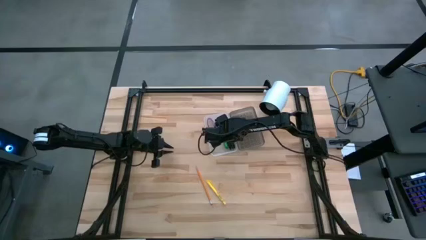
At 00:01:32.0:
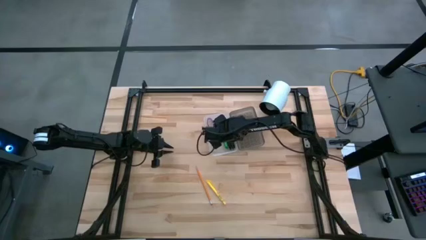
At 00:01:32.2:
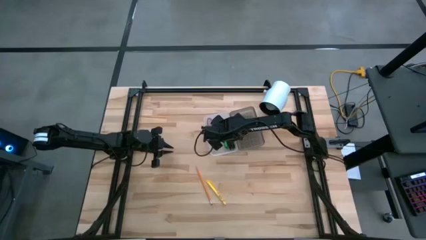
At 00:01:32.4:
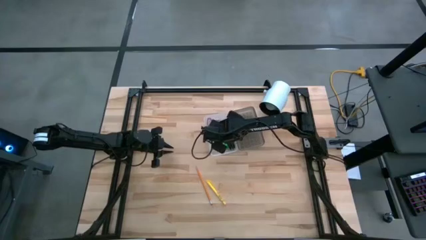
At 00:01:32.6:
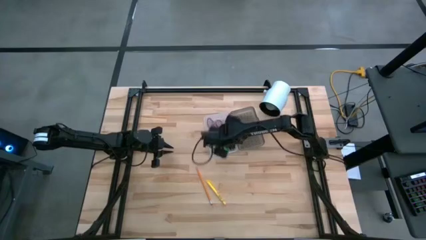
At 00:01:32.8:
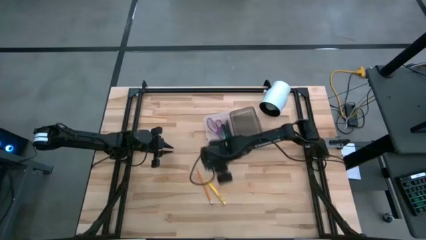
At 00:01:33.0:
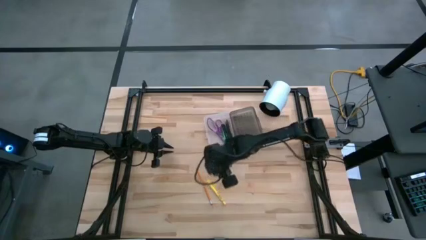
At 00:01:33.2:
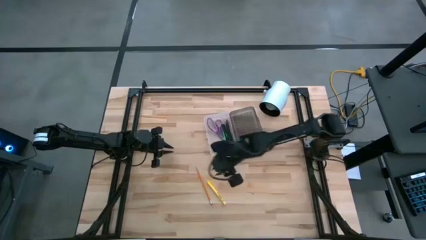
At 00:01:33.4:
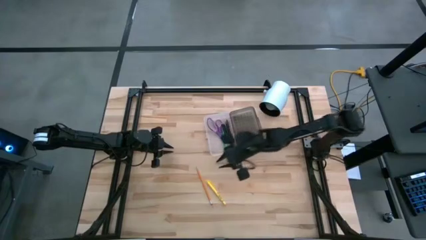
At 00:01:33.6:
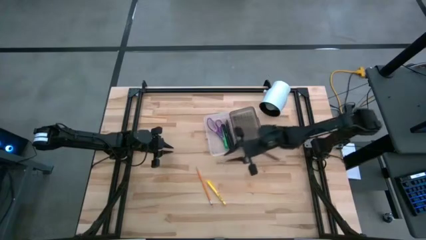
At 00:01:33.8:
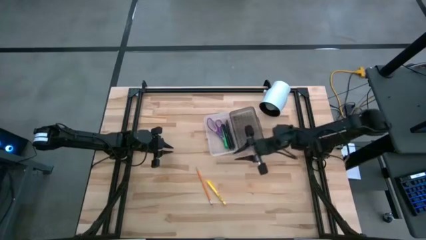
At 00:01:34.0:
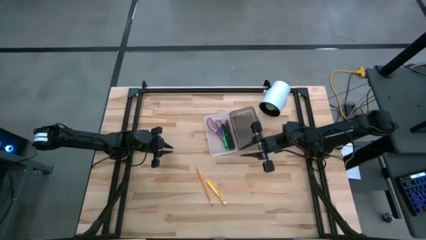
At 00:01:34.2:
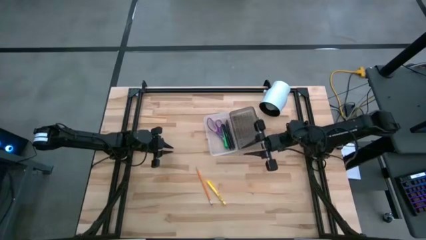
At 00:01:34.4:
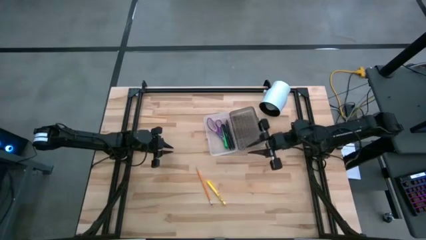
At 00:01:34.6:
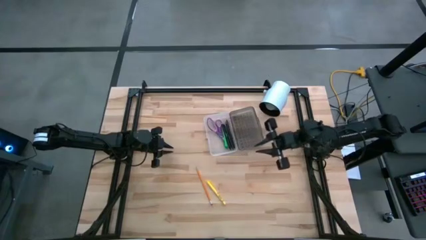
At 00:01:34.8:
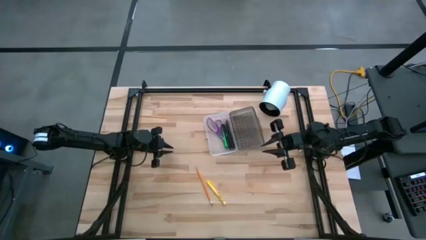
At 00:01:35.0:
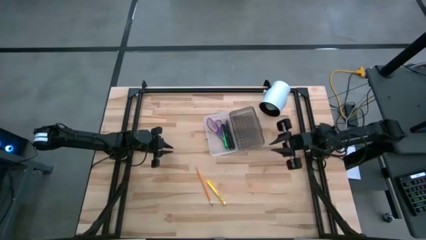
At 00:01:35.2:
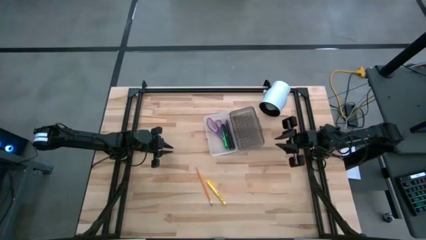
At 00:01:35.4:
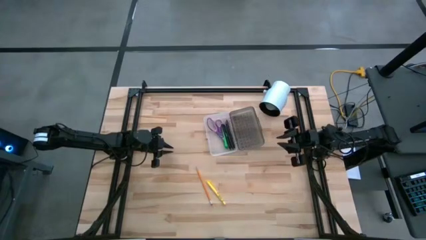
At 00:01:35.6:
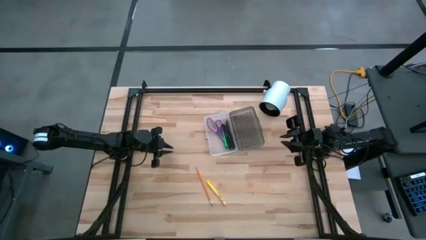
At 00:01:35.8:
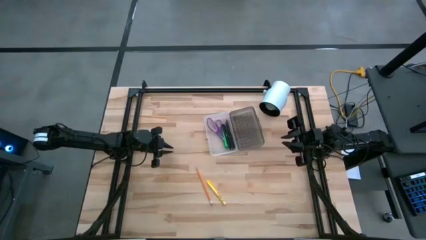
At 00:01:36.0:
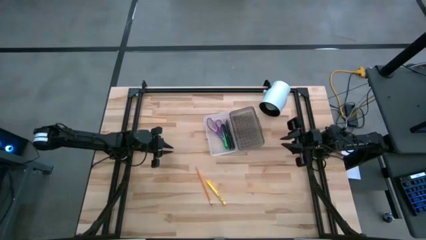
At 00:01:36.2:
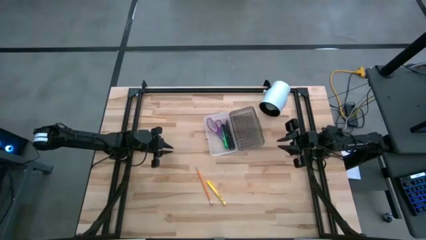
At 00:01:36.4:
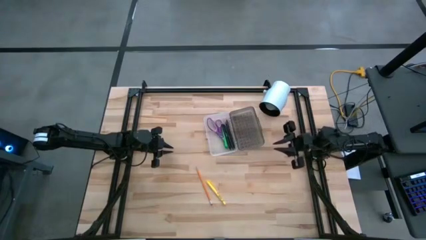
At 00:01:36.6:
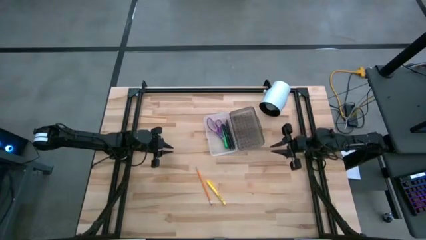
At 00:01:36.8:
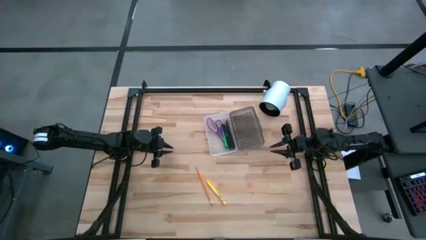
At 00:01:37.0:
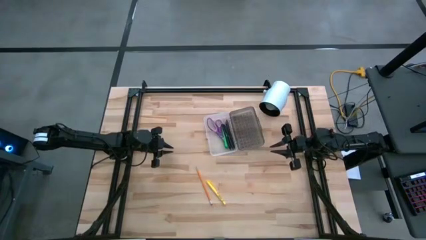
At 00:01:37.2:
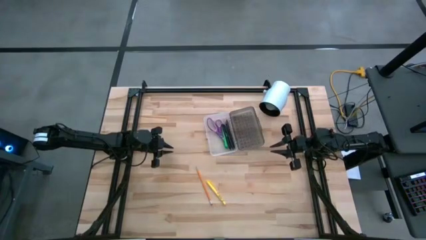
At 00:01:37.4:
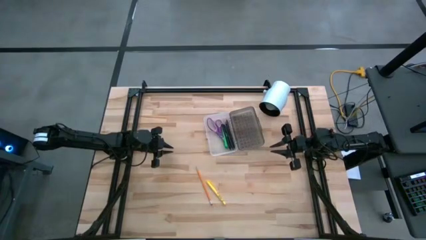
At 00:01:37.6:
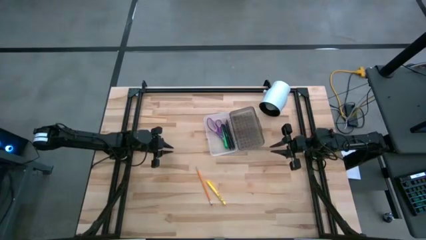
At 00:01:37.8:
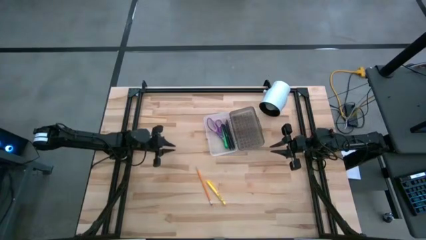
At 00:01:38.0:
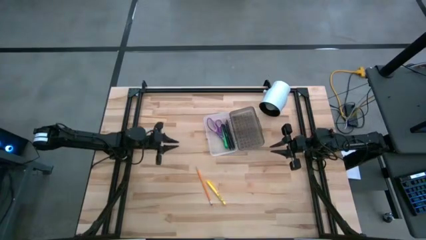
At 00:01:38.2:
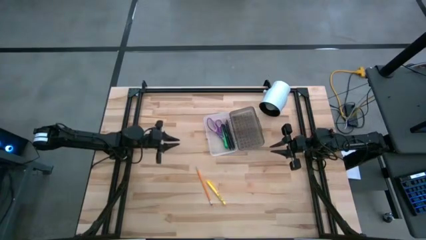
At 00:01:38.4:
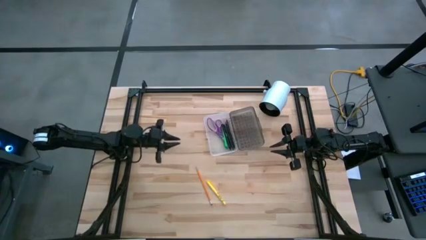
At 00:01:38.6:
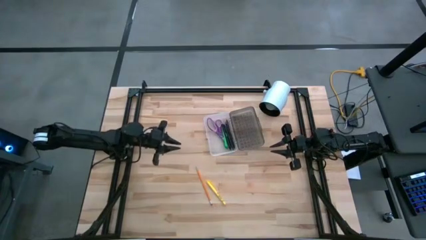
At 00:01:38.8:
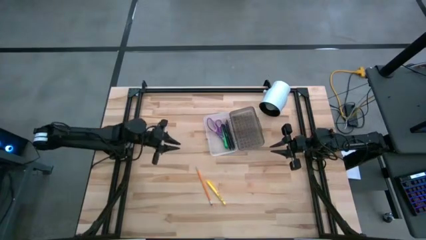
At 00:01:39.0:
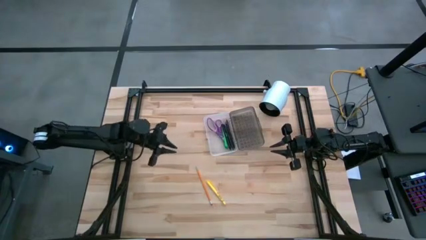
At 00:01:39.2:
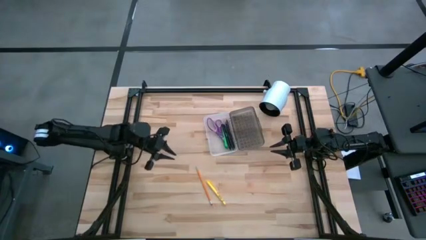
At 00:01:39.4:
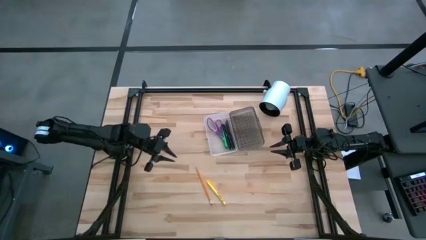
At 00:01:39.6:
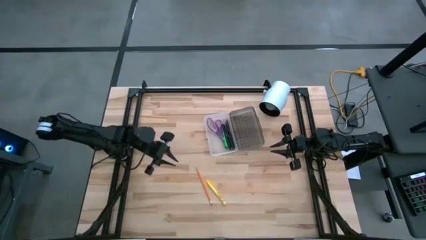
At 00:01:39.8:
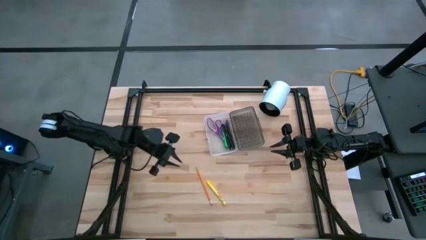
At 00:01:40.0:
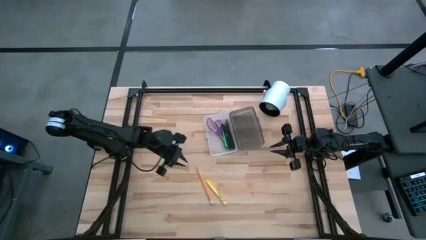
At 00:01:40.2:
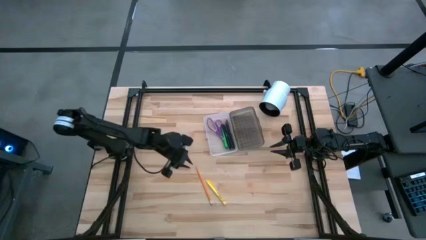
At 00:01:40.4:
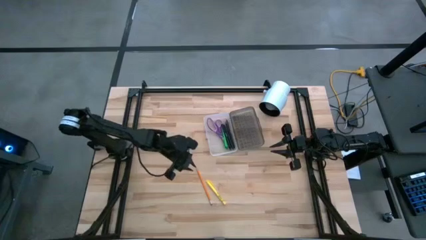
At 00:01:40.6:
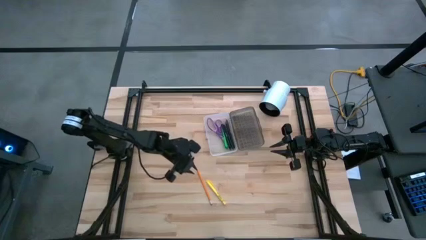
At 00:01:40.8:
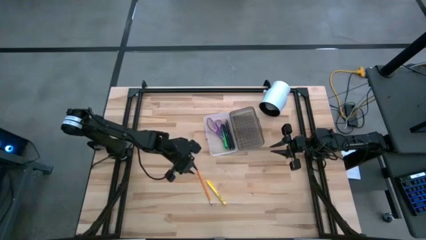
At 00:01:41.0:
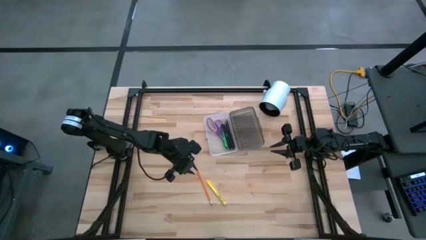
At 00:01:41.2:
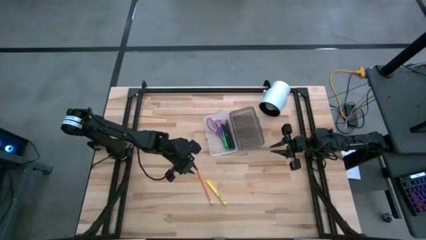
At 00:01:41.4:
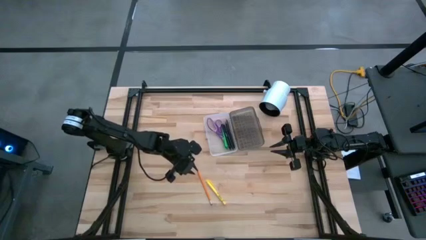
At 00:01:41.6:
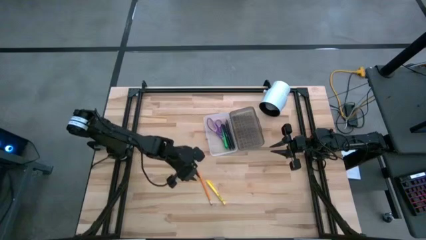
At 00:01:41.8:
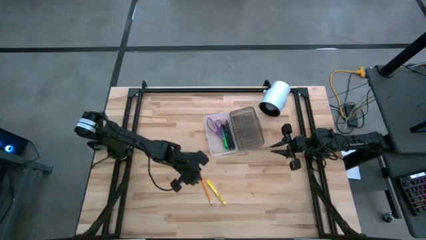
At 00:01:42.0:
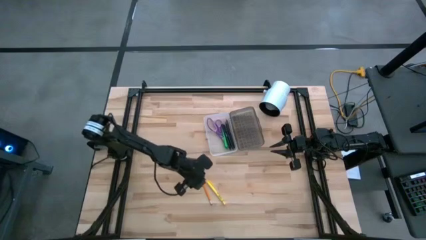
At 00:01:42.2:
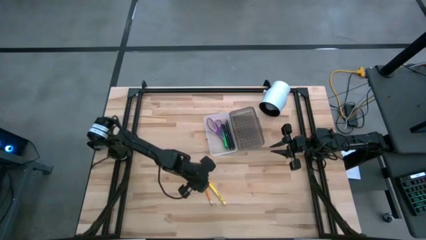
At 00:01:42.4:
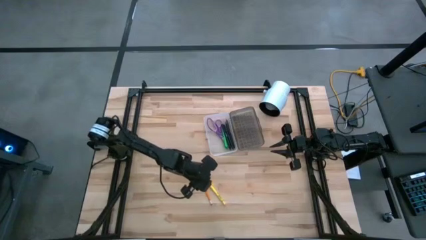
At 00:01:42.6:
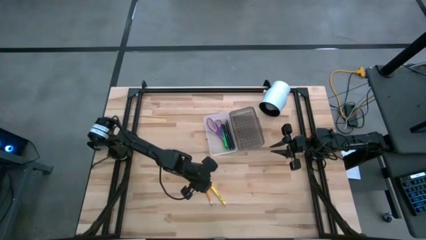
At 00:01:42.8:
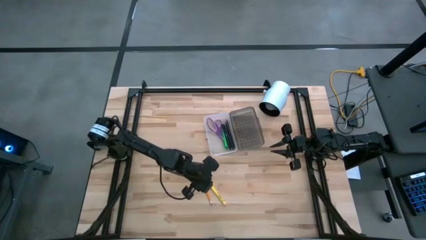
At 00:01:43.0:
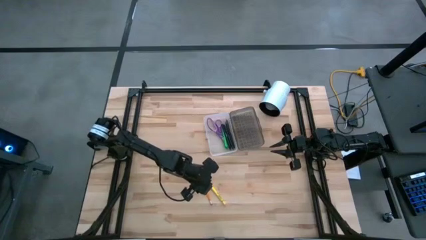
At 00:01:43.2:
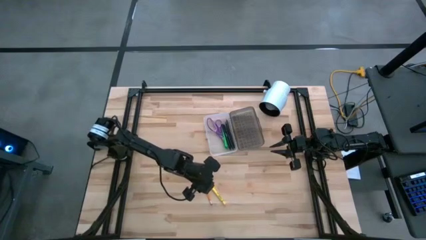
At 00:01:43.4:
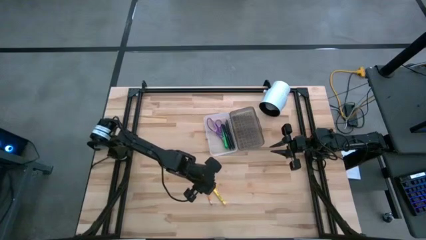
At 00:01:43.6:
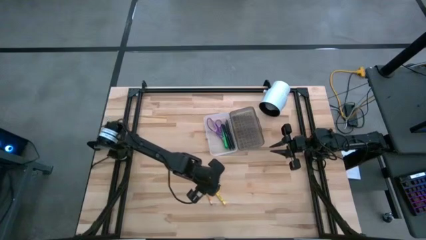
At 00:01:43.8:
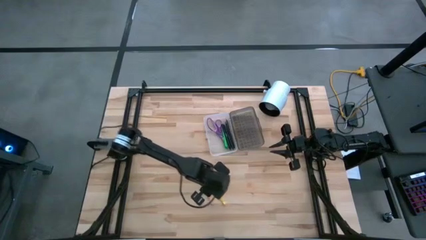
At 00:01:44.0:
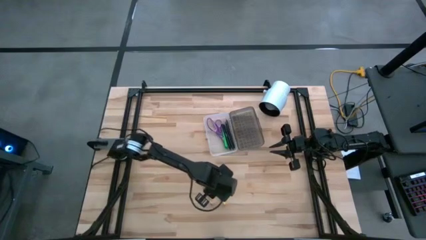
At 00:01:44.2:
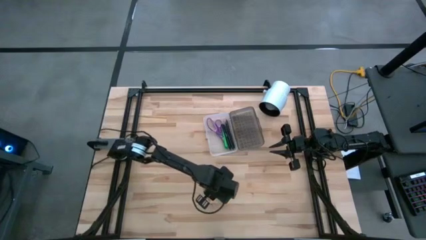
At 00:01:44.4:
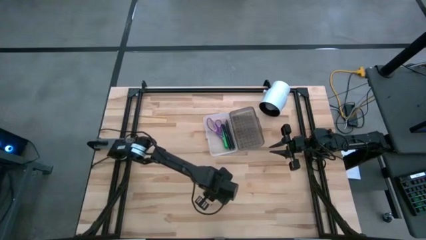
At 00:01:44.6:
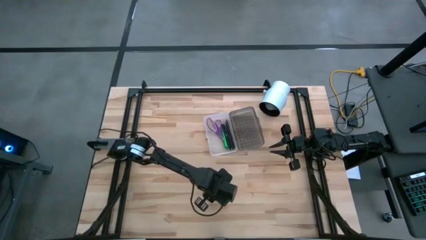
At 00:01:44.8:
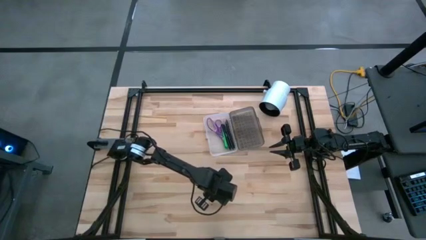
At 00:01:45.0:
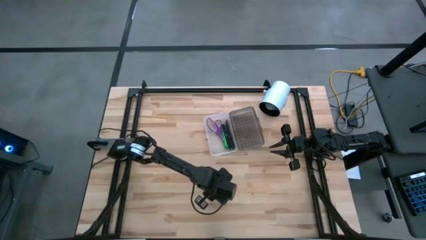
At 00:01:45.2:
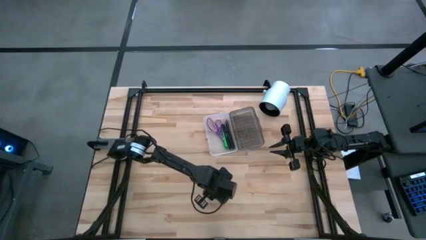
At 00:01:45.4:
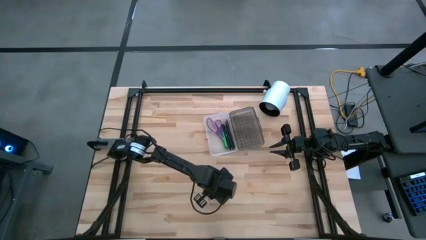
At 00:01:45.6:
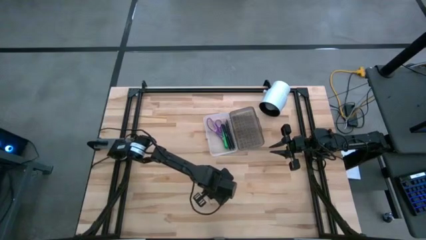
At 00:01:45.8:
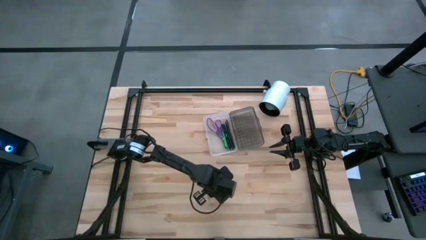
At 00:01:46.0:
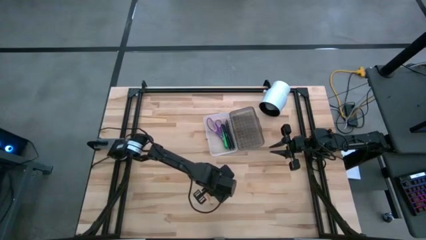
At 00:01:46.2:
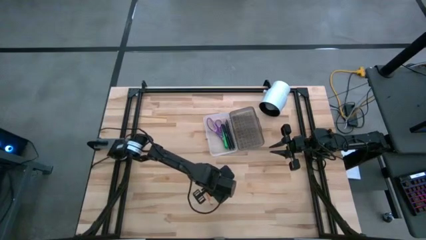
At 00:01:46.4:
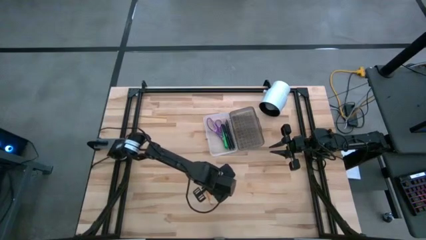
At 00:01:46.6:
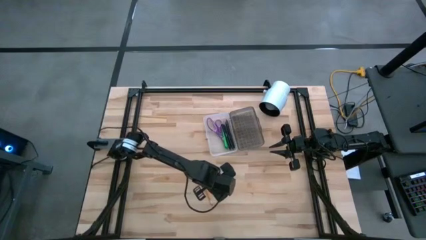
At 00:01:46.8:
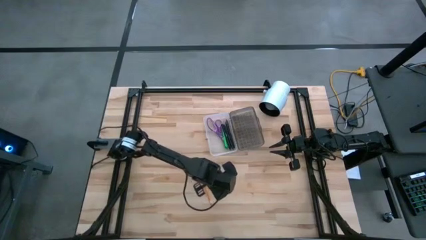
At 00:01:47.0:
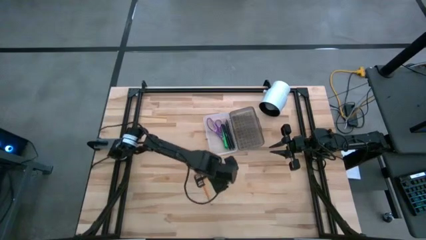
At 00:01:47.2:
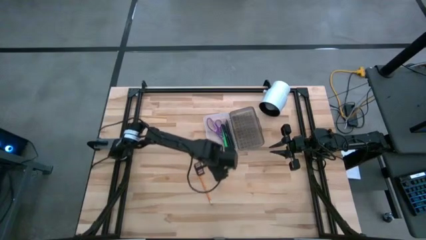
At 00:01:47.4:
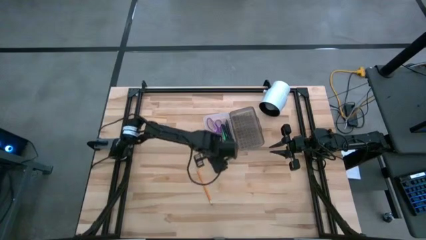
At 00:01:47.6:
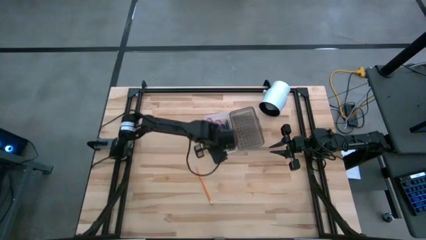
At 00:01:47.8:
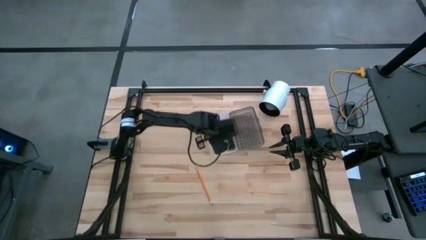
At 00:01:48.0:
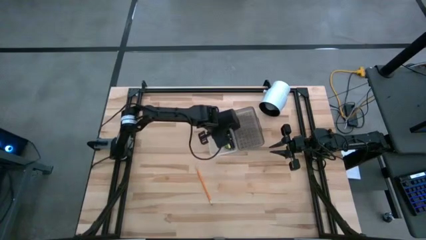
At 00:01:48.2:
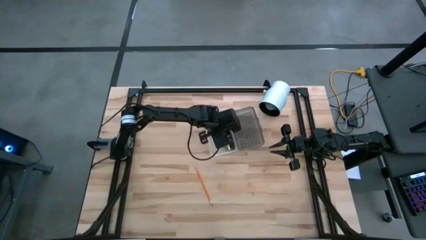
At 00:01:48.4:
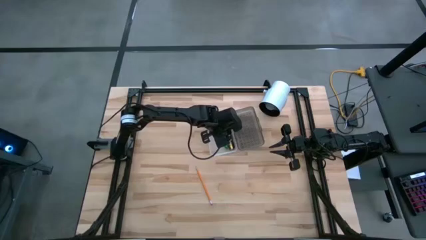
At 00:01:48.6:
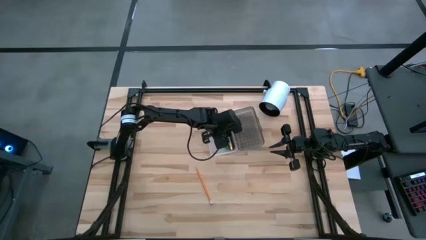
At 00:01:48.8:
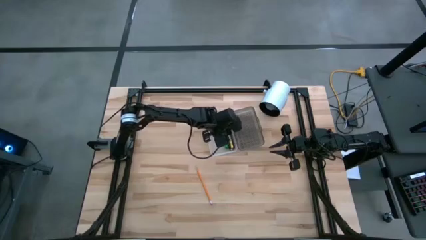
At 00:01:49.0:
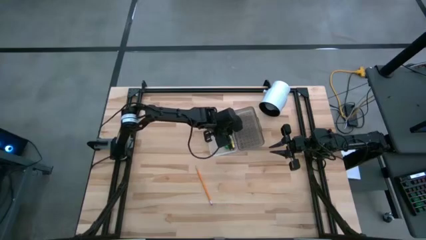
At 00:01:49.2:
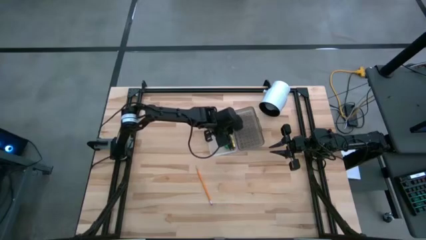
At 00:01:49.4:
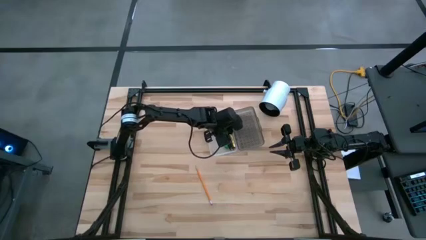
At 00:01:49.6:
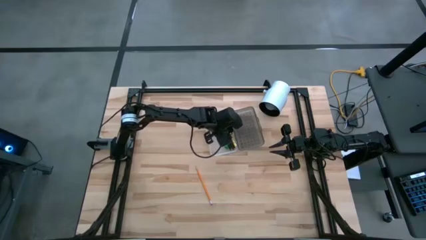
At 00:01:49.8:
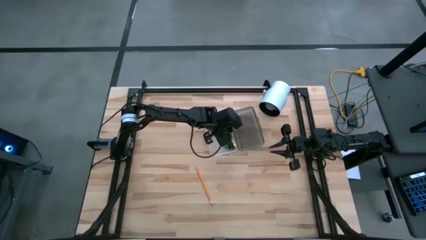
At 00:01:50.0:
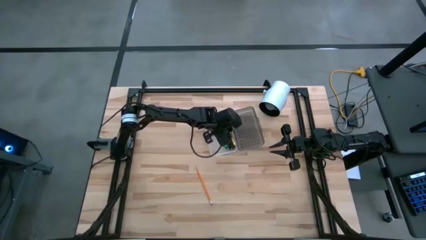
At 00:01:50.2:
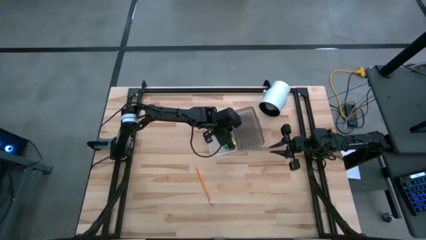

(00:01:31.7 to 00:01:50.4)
Task: Pick & place school supplies into a supply box
Put the yellow pen into the supply box
